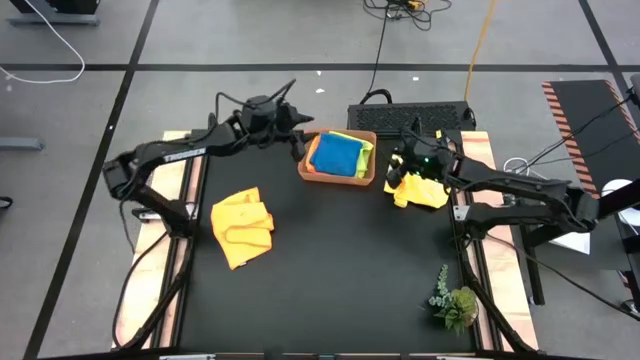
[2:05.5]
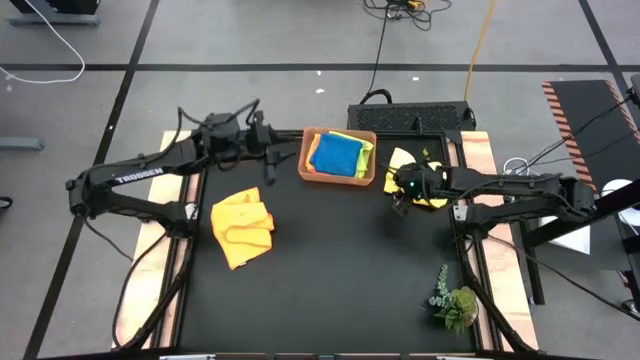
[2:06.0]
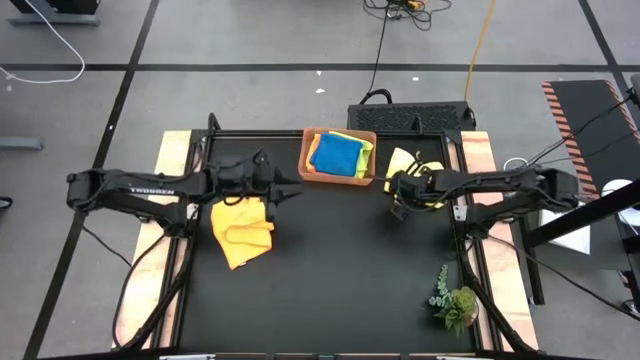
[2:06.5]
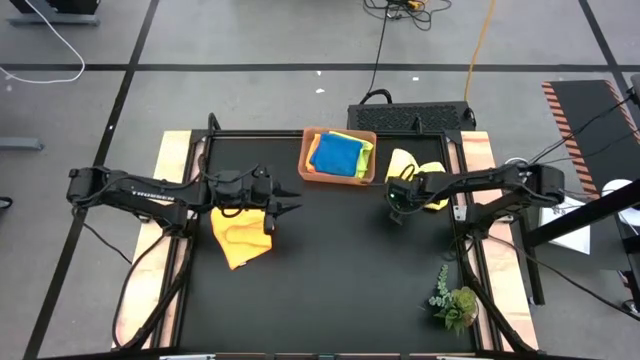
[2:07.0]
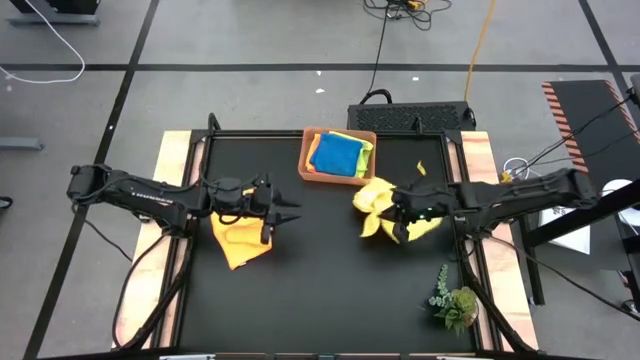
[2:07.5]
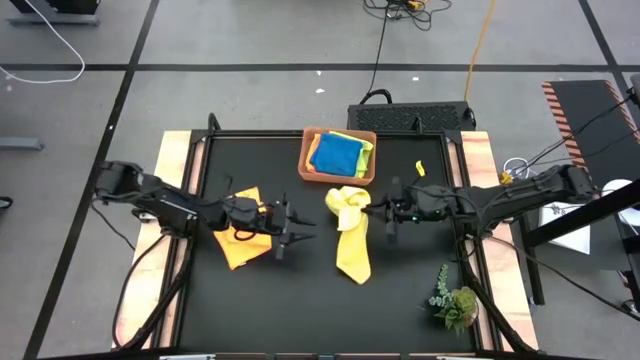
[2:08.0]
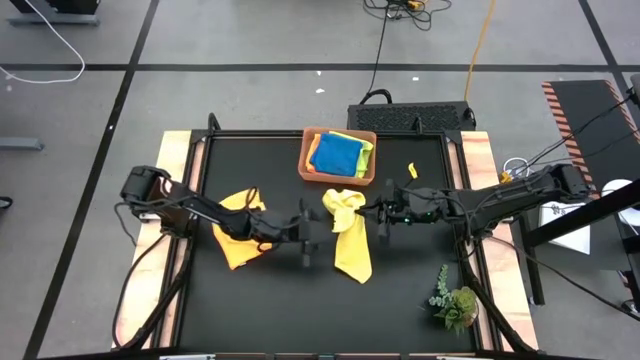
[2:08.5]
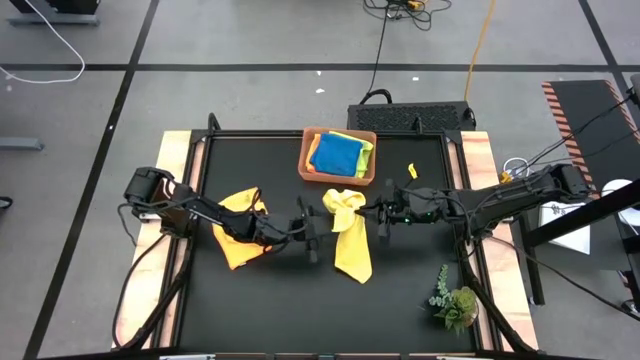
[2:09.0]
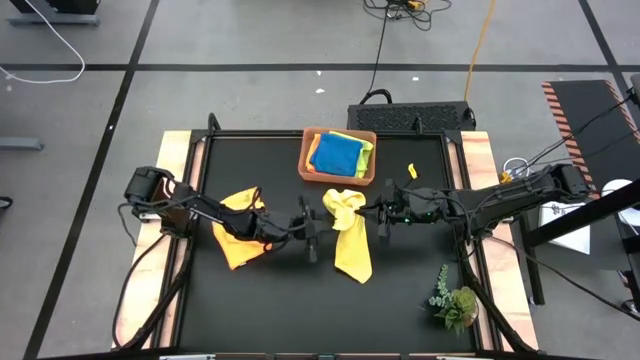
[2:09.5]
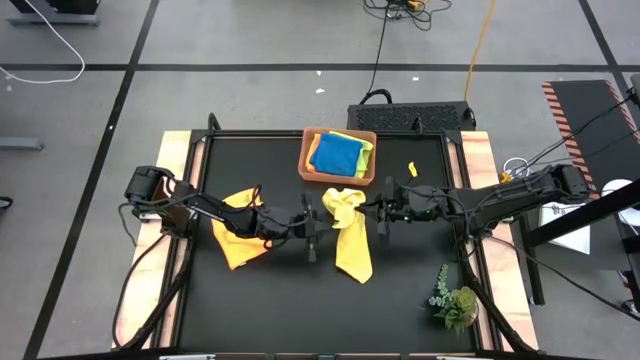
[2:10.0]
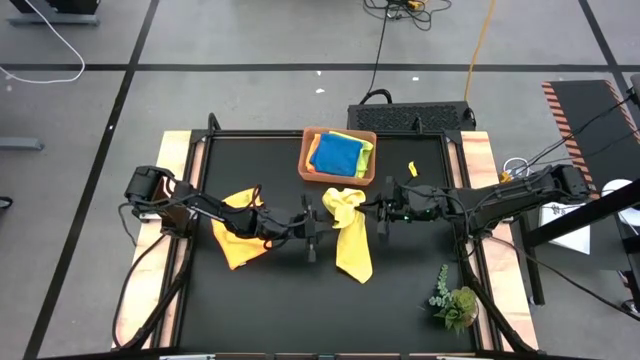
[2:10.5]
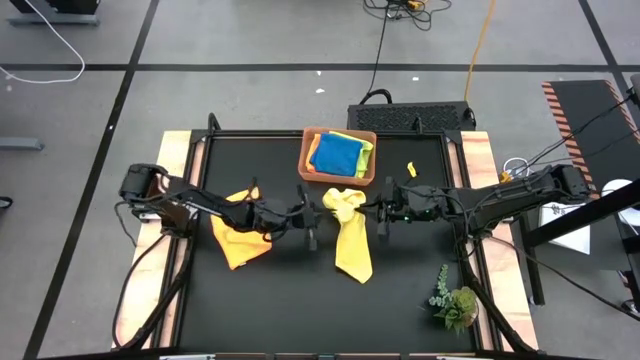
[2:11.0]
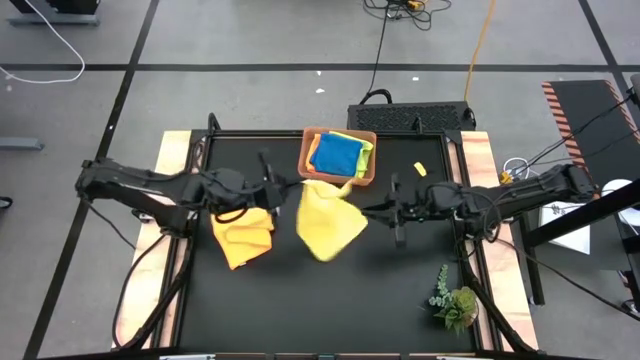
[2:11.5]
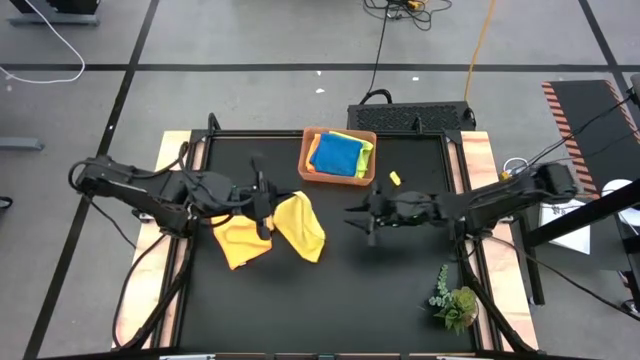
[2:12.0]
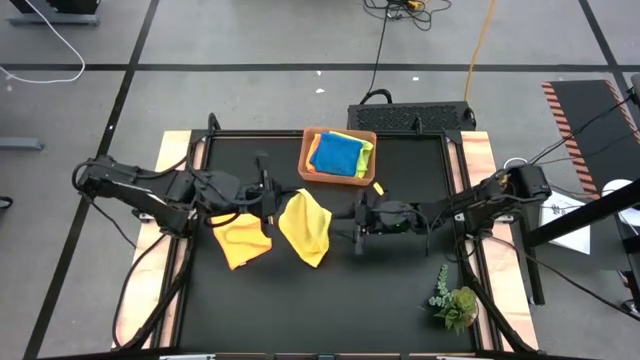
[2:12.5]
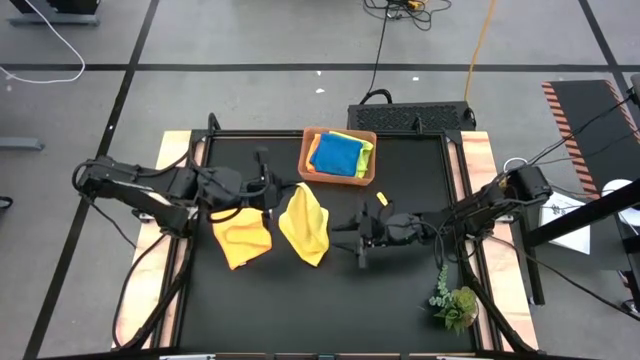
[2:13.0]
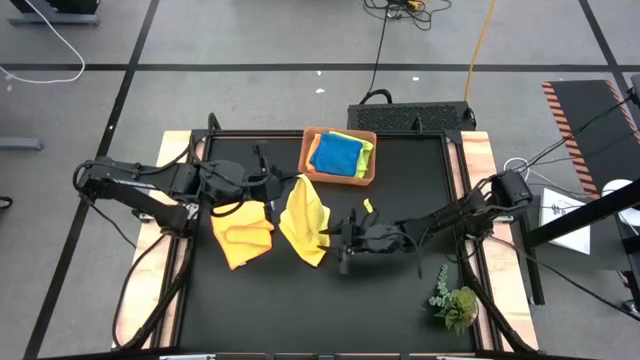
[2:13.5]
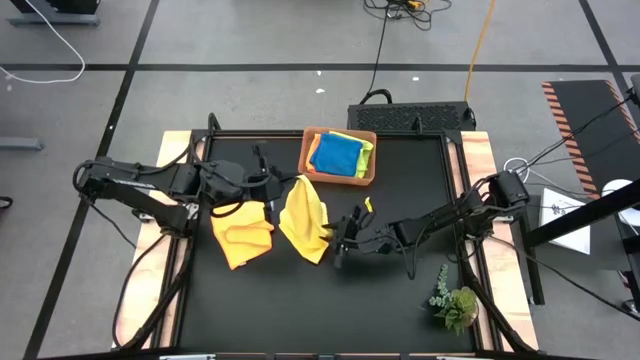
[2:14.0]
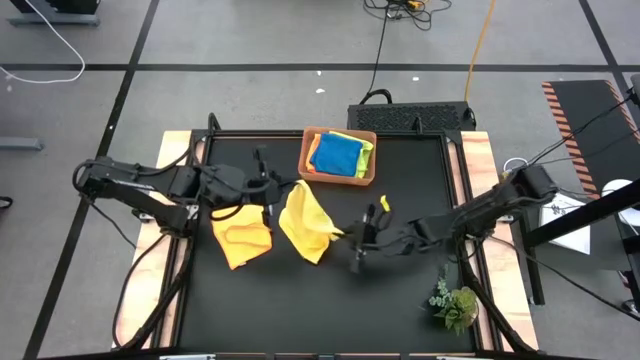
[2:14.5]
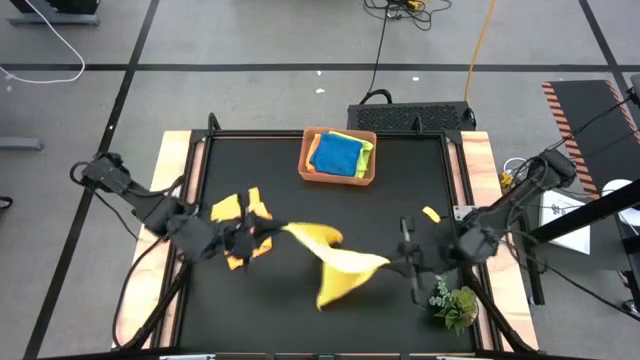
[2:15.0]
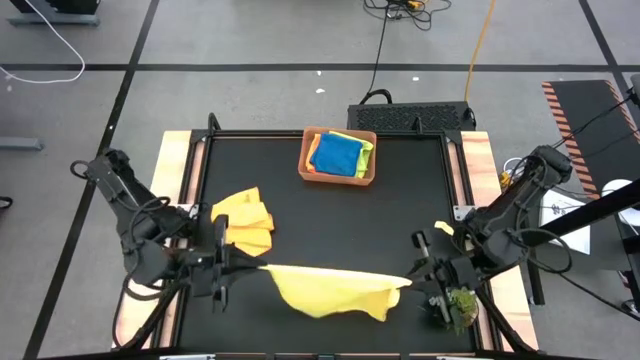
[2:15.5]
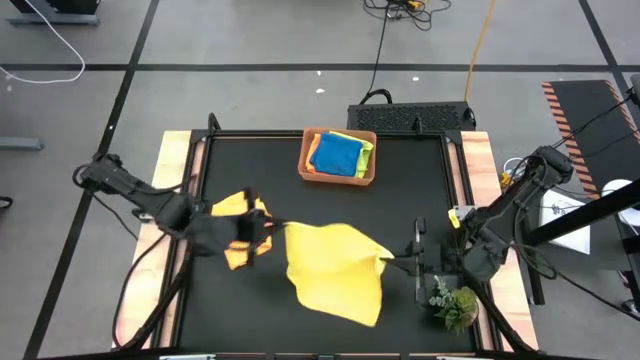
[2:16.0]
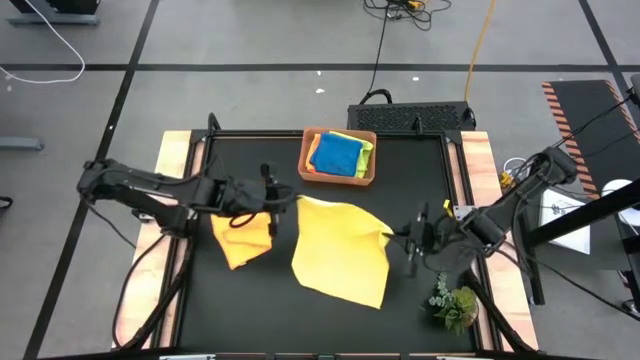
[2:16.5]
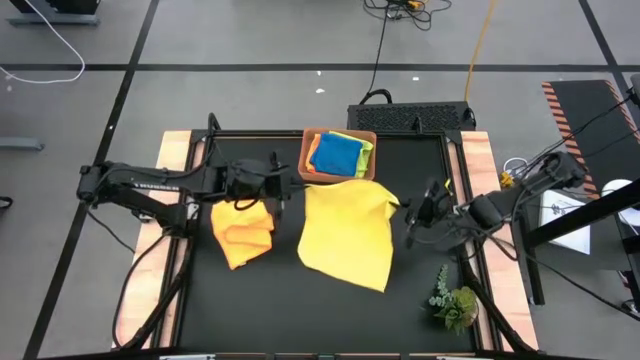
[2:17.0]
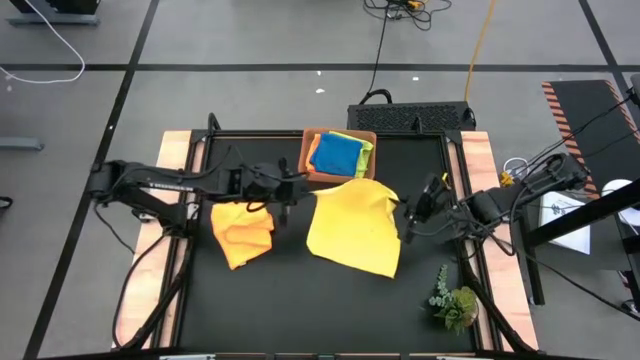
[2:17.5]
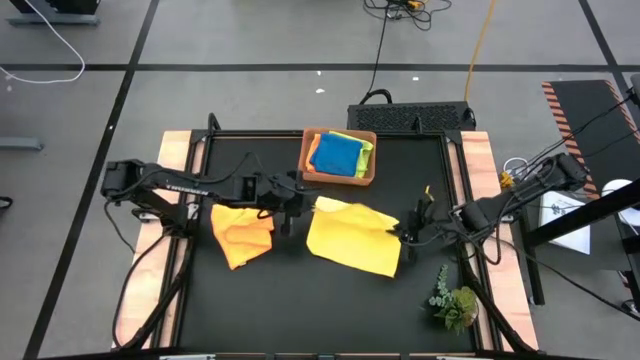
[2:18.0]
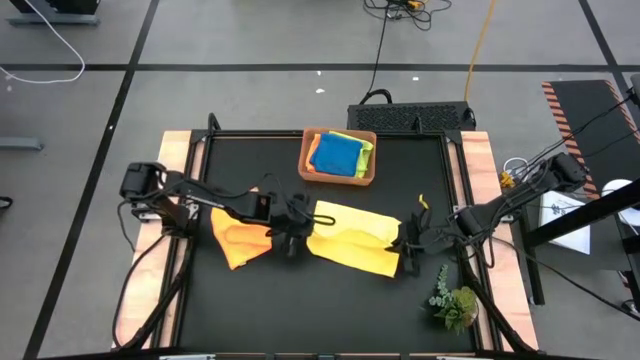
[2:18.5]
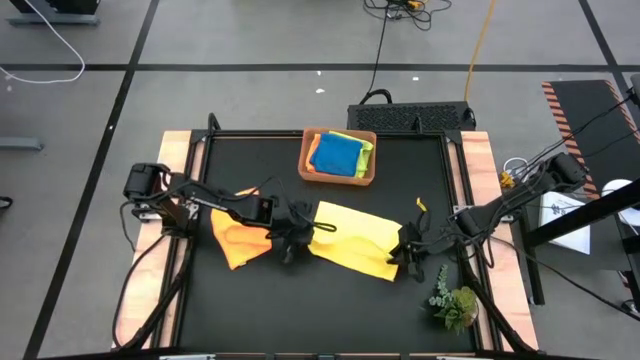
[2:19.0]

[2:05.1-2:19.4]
Task: Fold microfiber towels
Fold the yellow microfiber towel

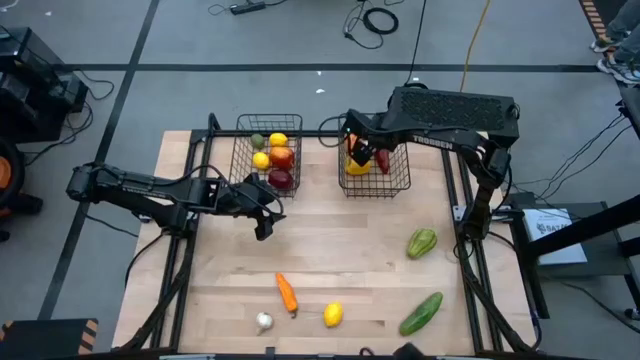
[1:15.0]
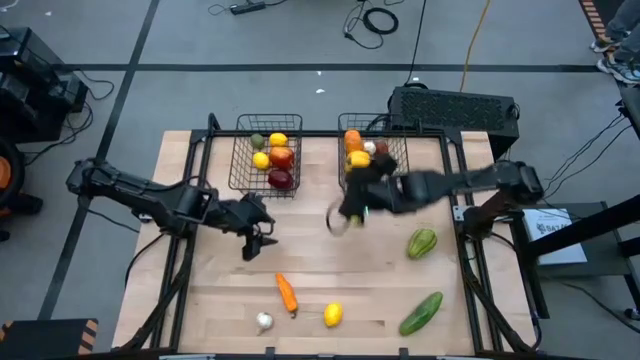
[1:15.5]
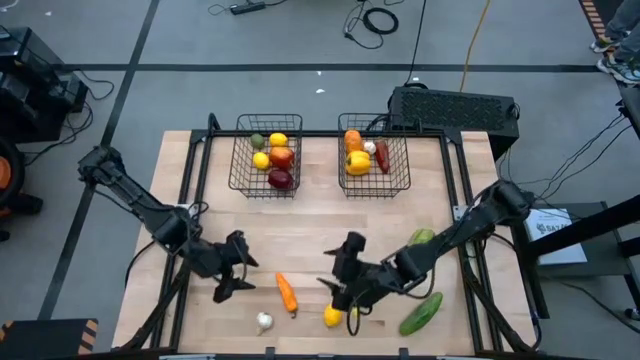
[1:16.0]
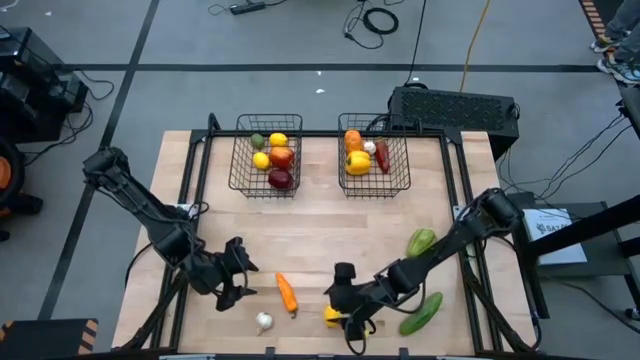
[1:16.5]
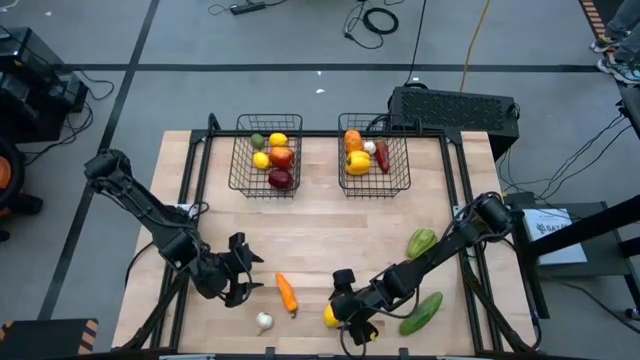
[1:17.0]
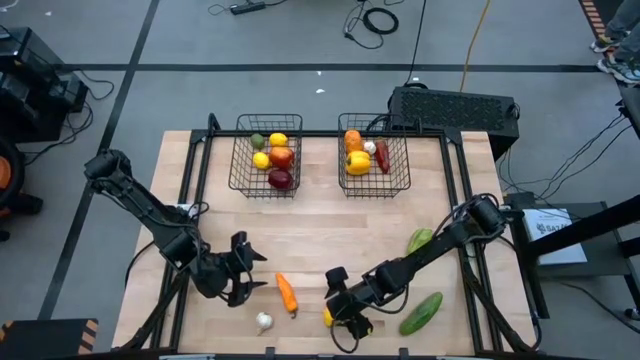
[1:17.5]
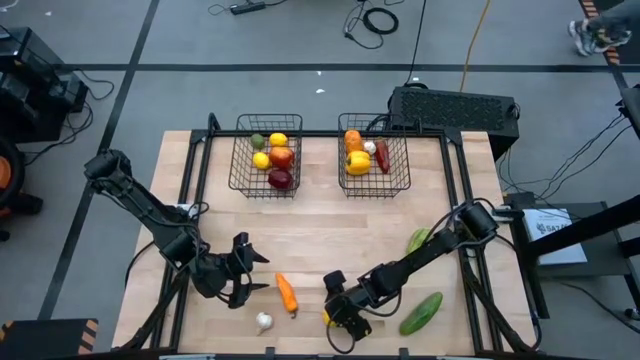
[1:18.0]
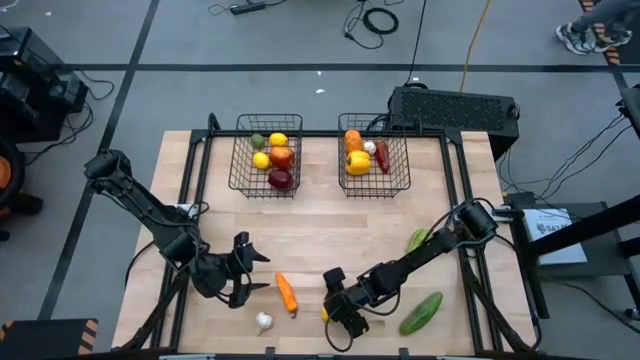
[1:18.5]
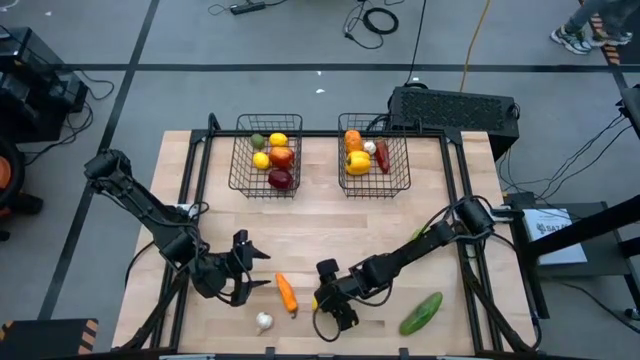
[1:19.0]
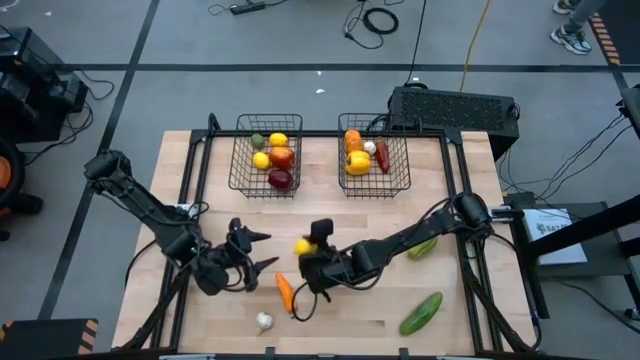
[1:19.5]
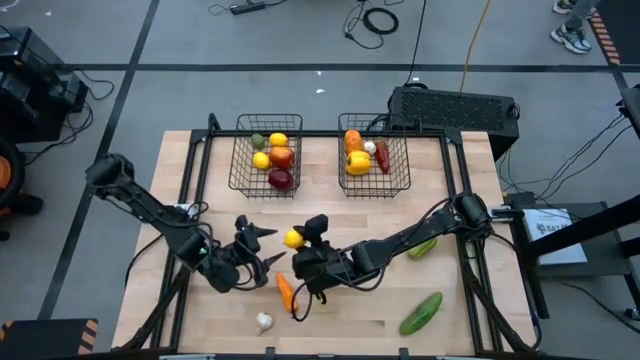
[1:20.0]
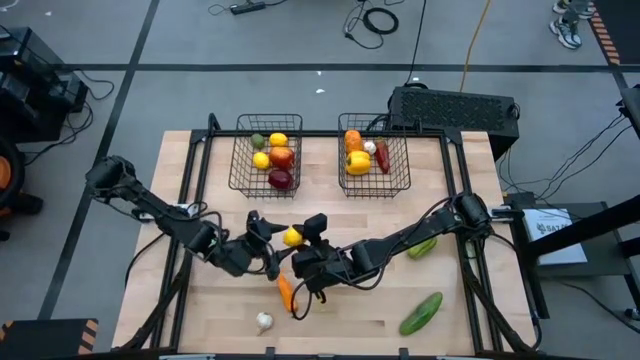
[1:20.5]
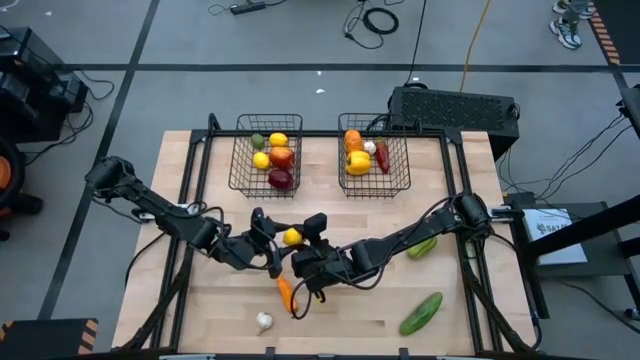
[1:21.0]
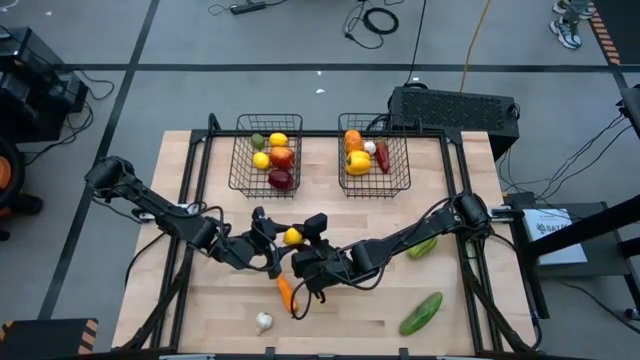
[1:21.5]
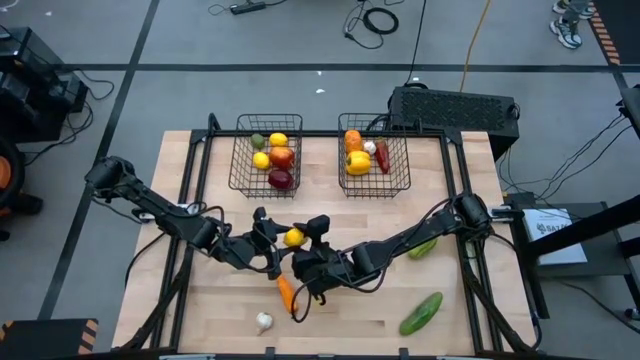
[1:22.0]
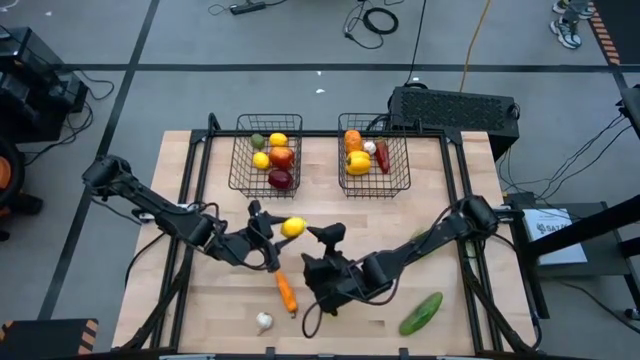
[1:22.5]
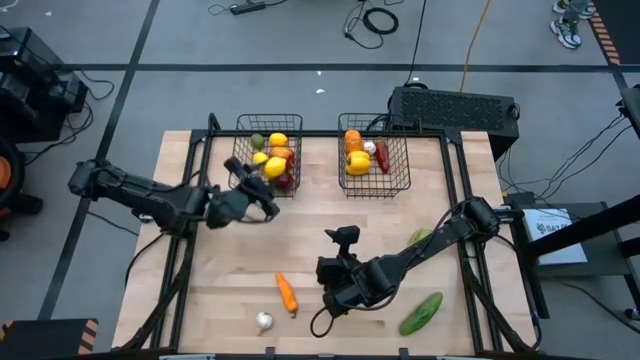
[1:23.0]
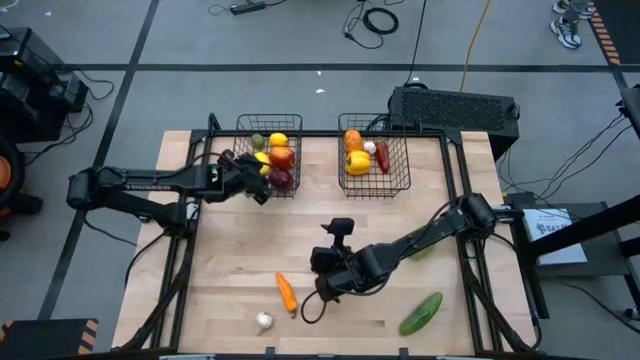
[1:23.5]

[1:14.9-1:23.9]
Task: Sort produce into baskets
Put the yellow lemon into the left mesh basket
